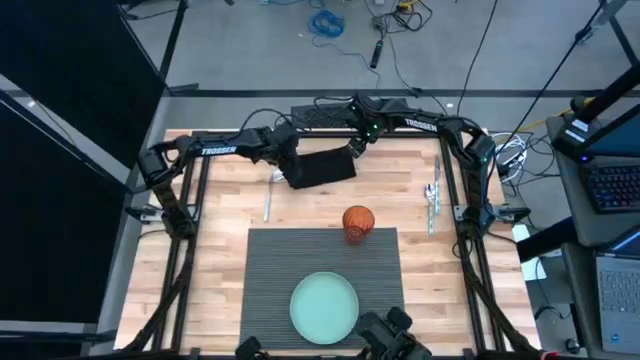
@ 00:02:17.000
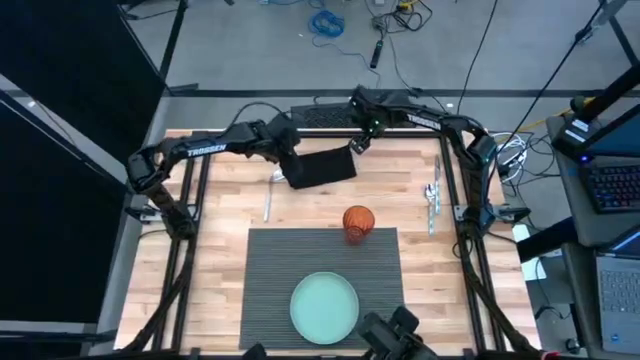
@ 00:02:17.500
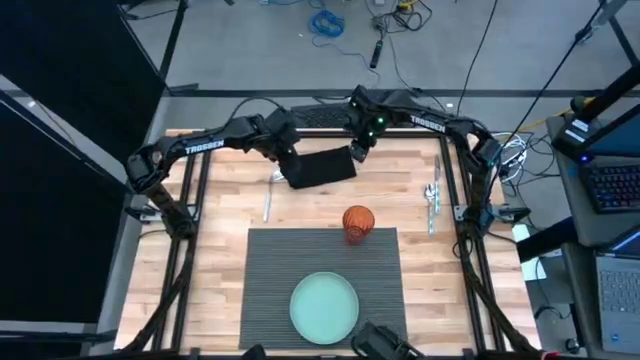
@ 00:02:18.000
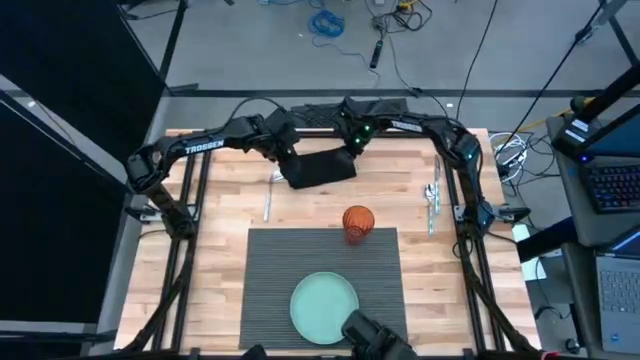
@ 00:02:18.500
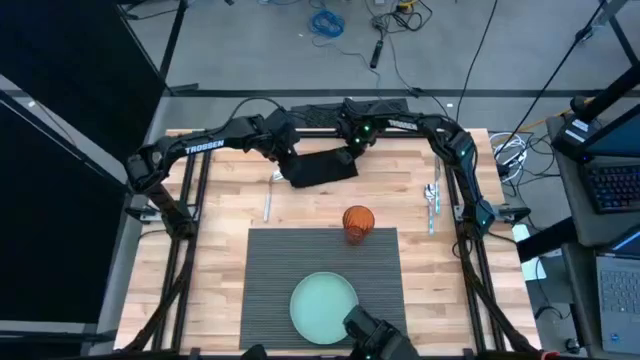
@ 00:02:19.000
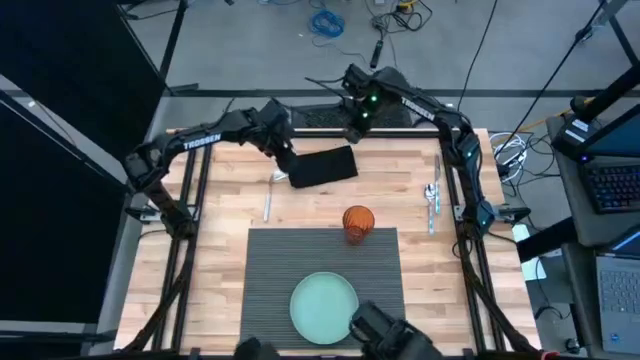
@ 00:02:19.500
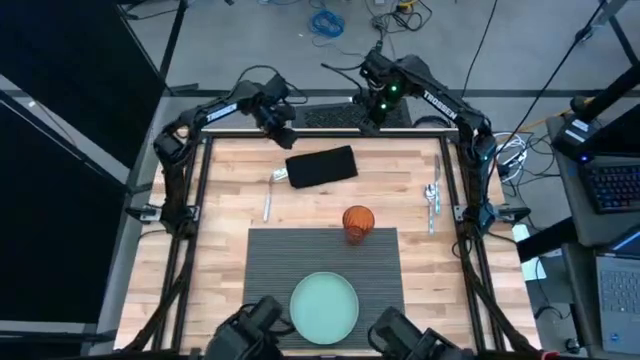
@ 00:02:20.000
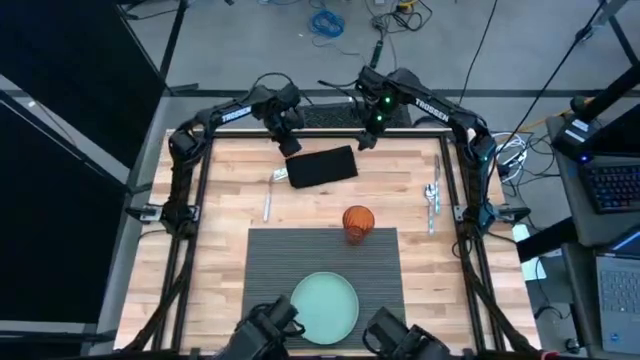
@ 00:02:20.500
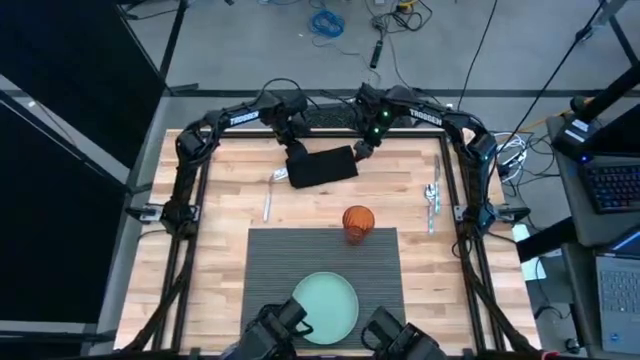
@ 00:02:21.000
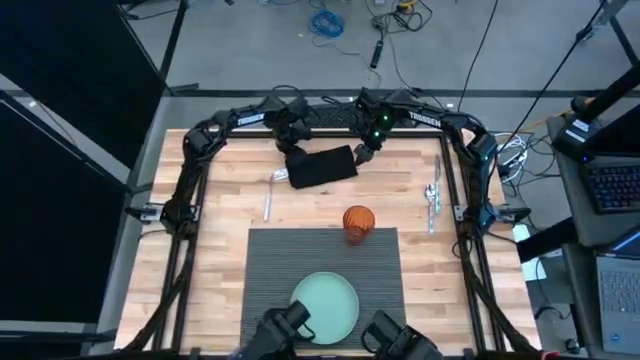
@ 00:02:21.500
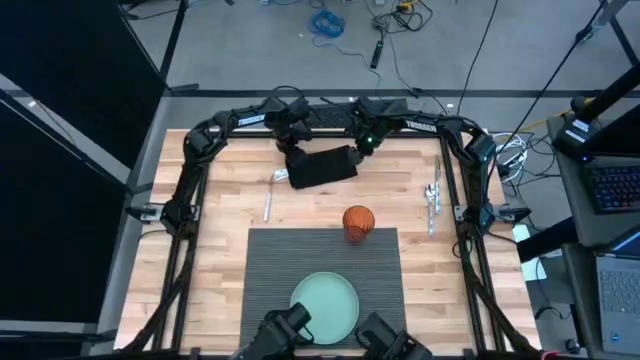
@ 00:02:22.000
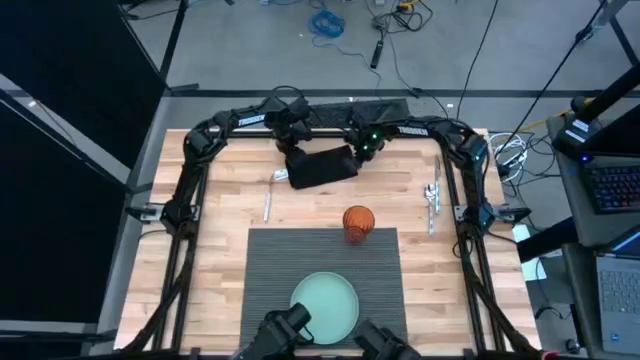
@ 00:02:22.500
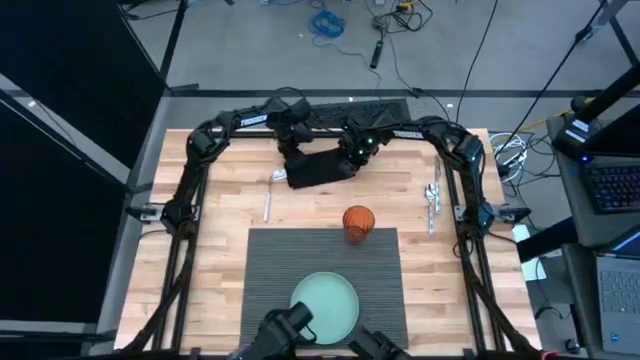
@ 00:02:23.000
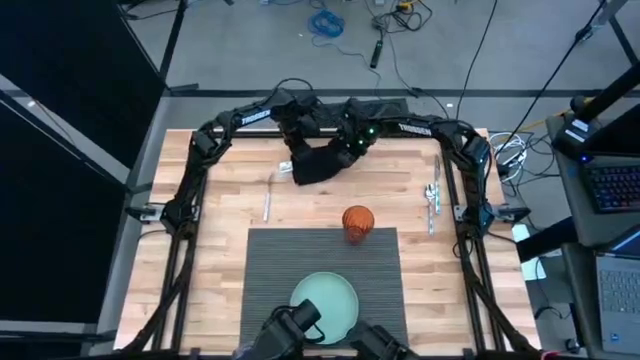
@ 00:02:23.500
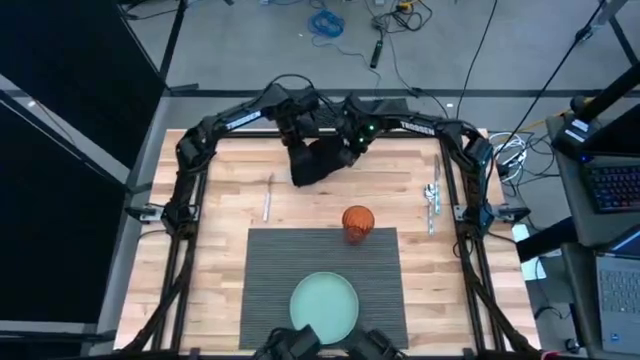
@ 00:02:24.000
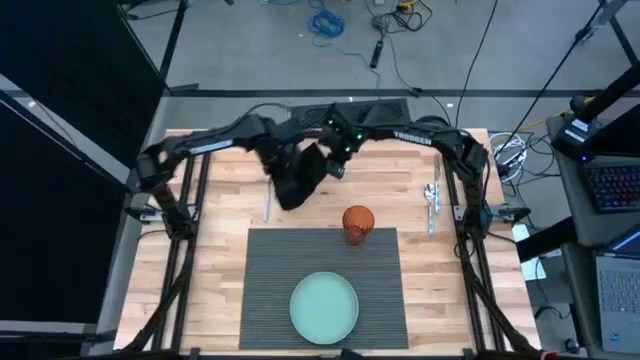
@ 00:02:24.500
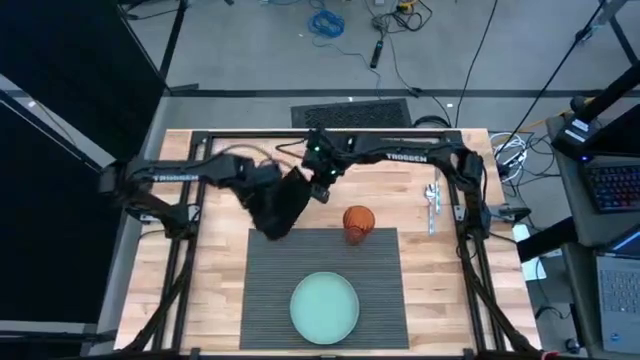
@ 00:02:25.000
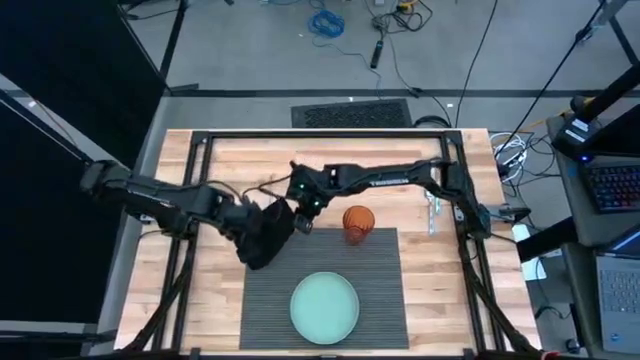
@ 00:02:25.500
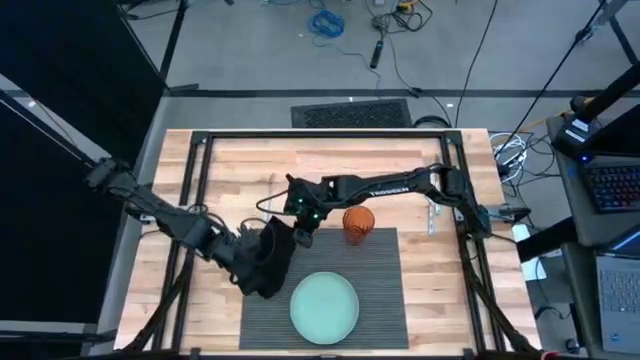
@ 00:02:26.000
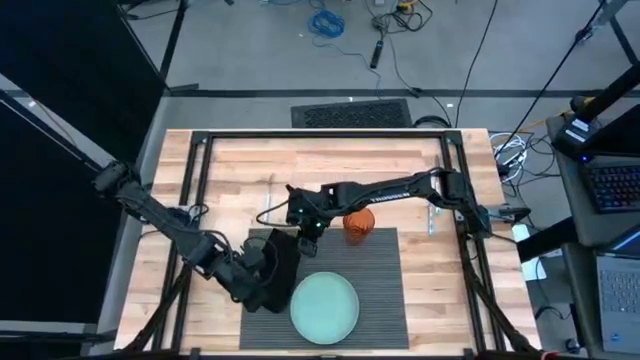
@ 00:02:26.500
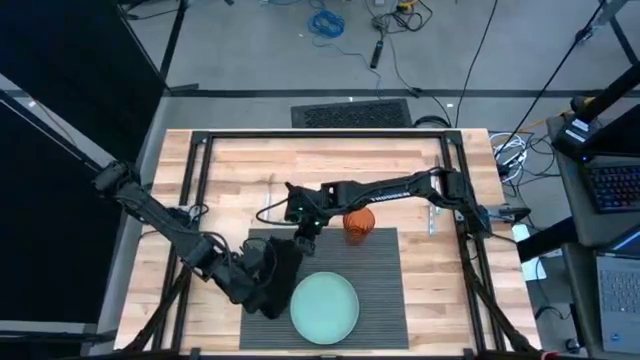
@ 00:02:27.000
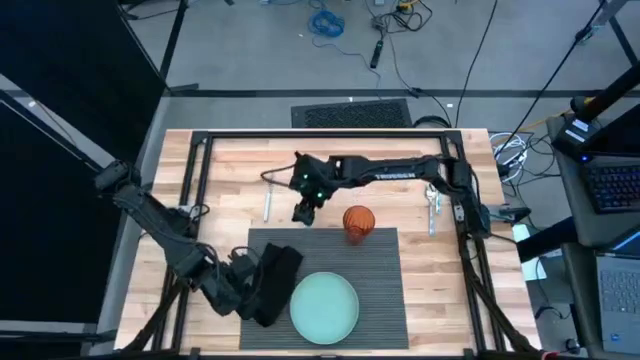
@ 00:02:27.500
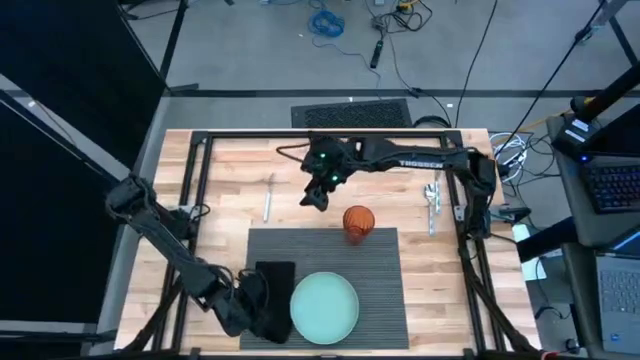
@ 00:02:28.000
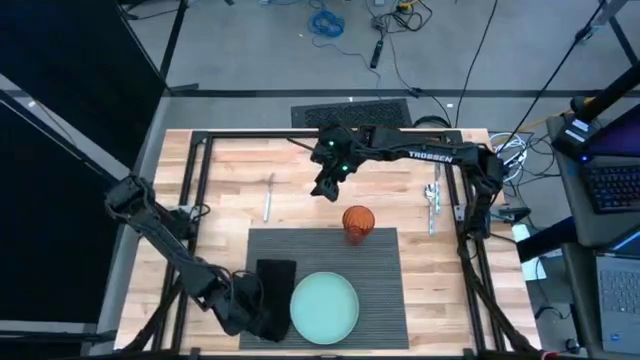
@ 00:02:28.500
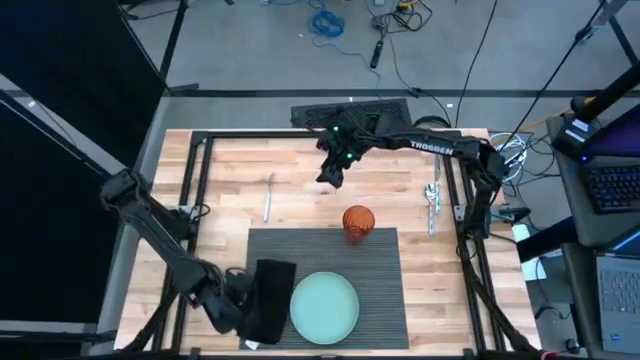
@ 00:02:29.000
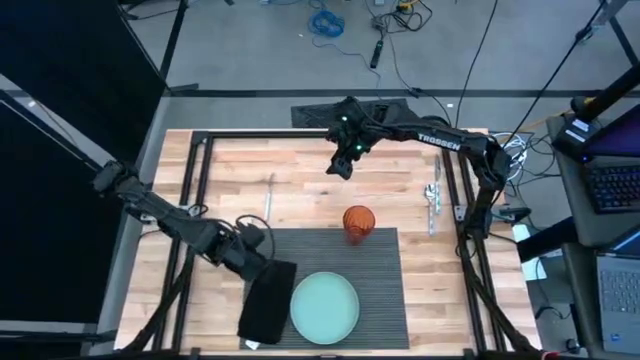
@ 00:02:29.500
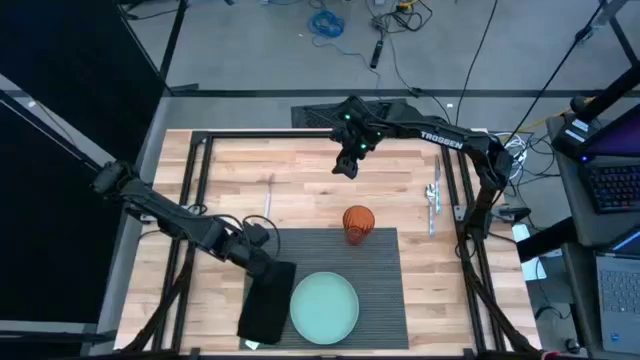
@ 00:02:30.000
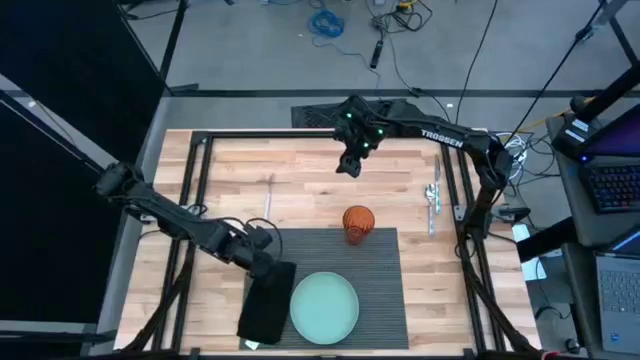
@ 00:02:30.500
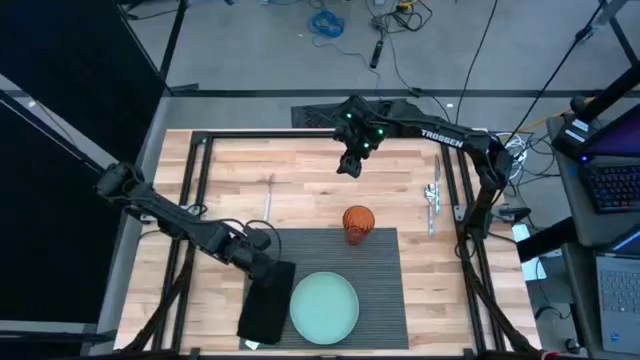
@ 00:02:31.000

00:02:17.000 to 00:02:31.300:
Task: Set table place
Put the black napkin on the gray mat to the left of the green plate

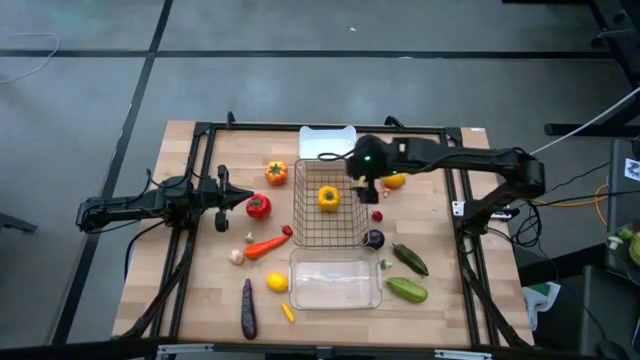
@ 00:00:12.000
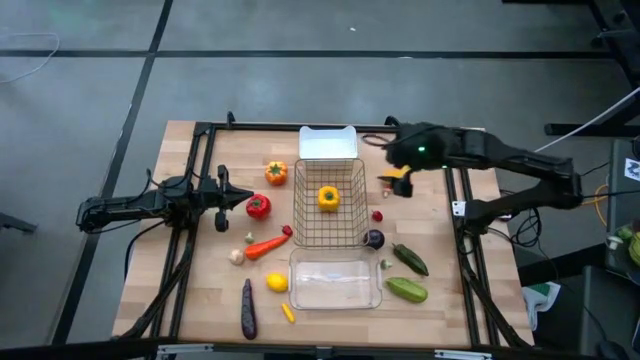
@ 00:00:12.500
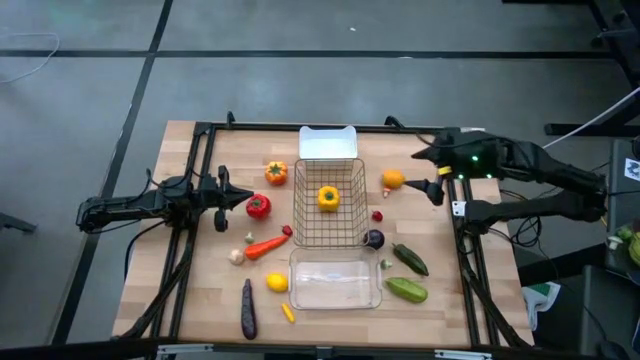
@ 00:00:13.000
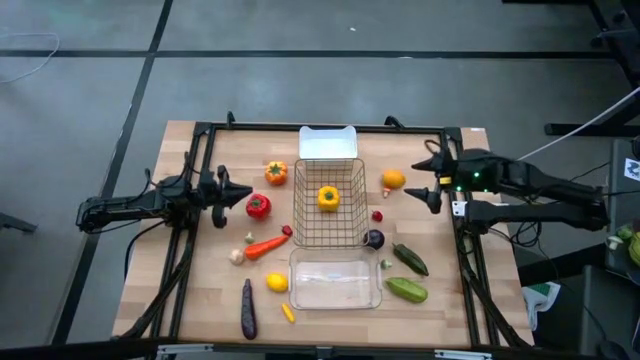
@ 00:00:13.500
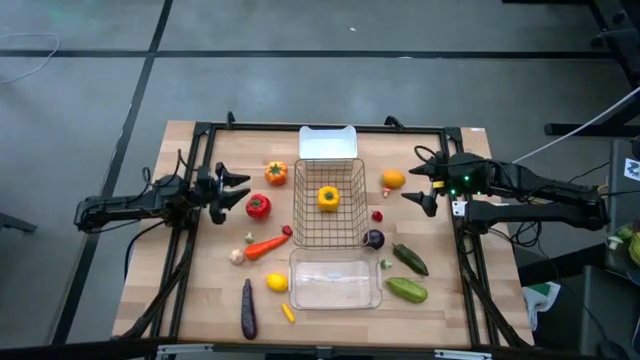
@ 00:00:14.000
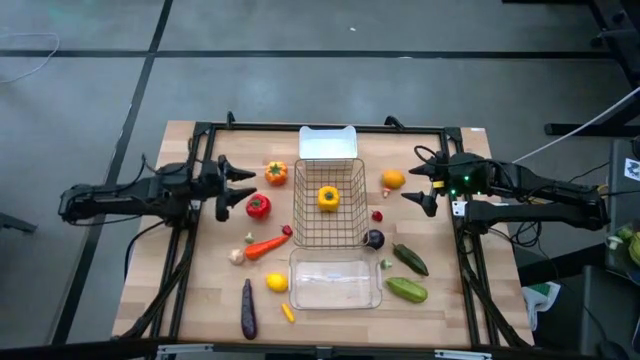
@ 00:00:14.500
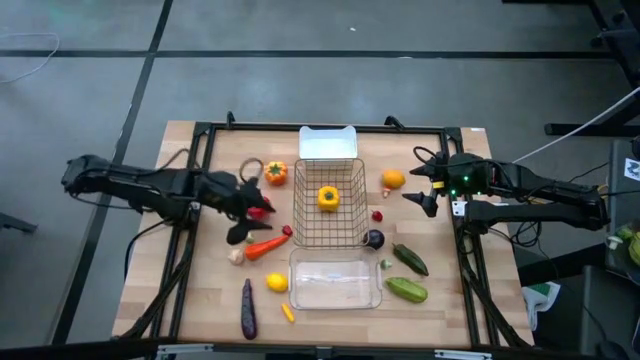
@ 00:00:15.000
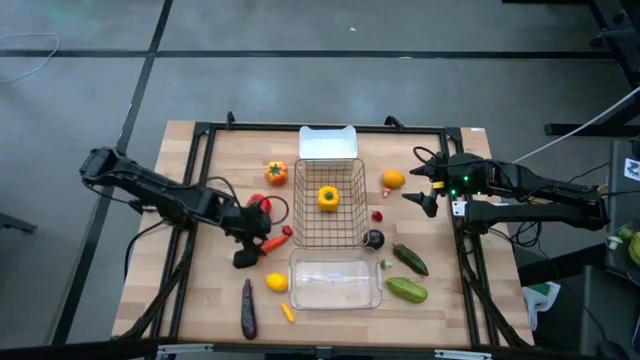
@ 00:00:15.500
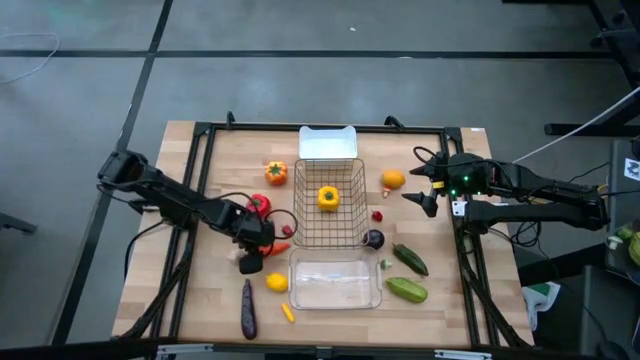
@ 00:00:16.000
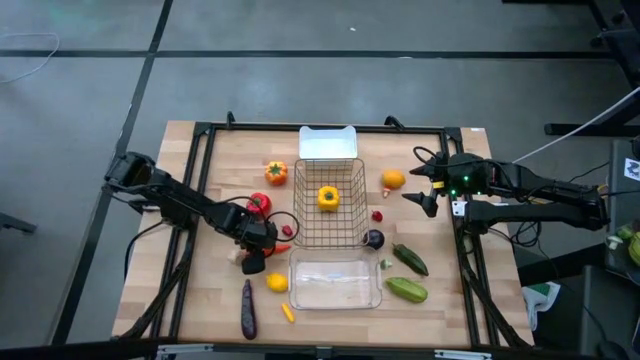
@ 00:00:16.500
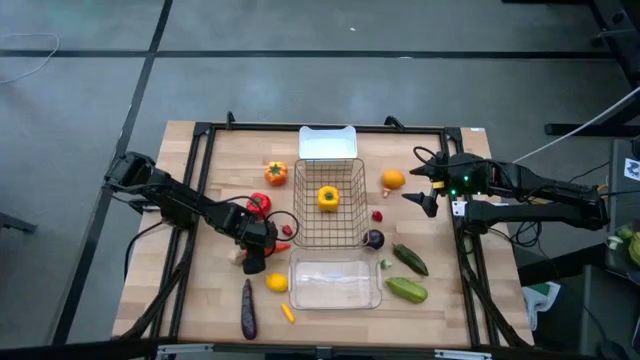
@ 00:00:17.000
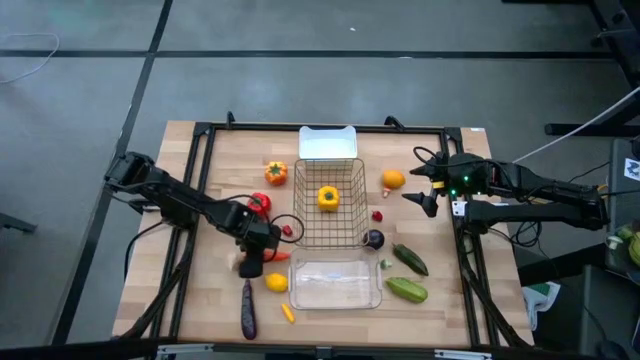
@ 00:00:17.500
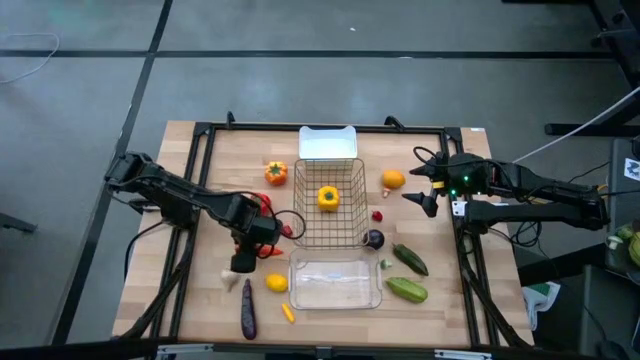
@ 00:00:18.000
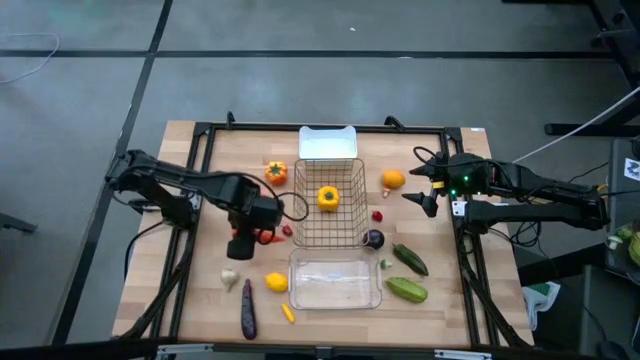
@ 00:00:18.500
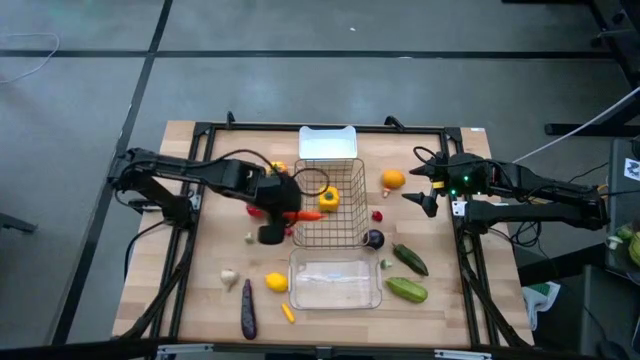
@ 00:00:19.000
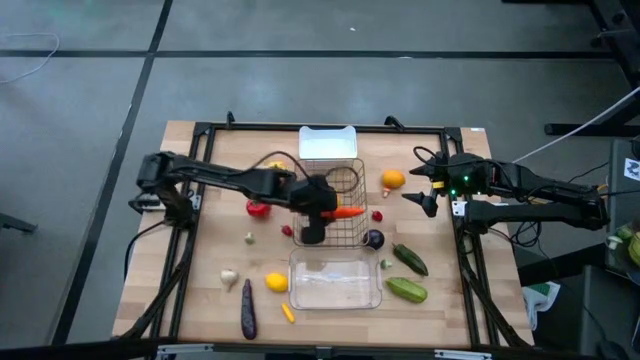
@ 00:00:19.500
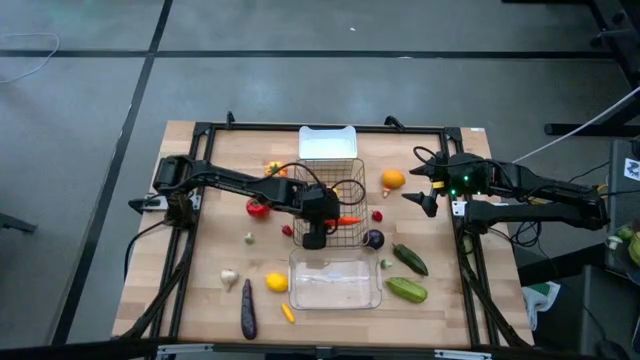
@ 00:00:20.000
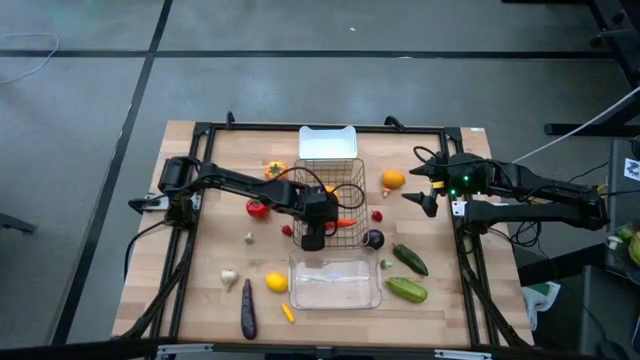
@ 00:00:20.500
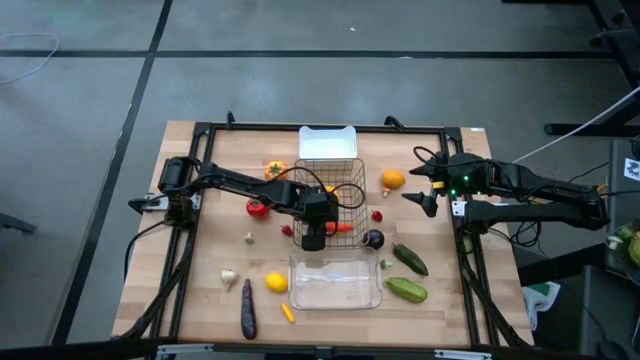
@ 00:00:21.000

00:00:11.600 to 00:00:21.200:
Task: Sort produce into baskets
Put the carrot into the wire basket
